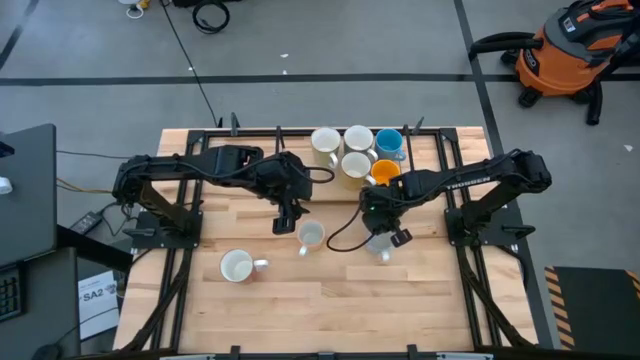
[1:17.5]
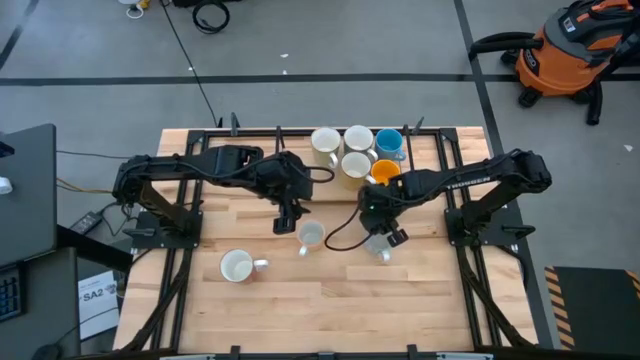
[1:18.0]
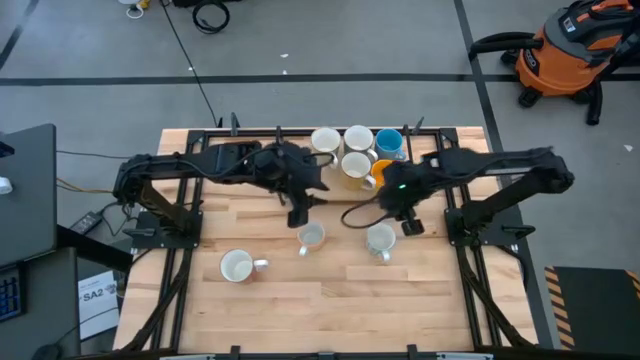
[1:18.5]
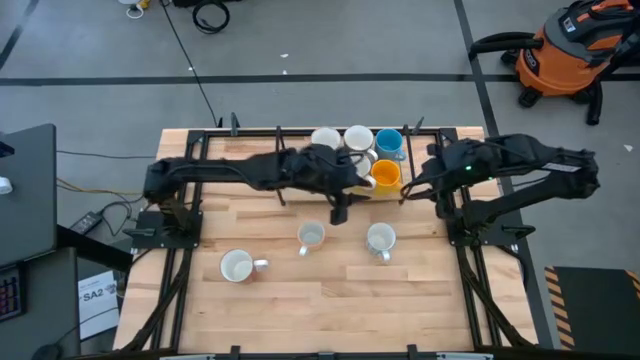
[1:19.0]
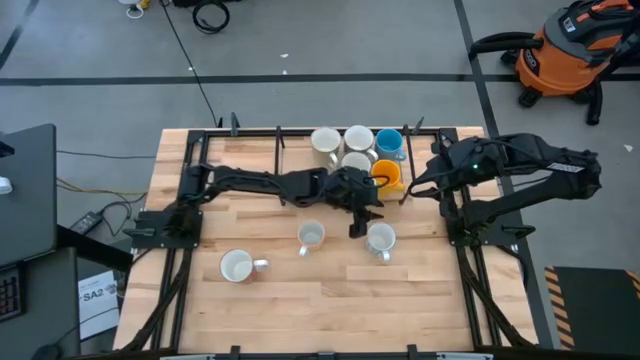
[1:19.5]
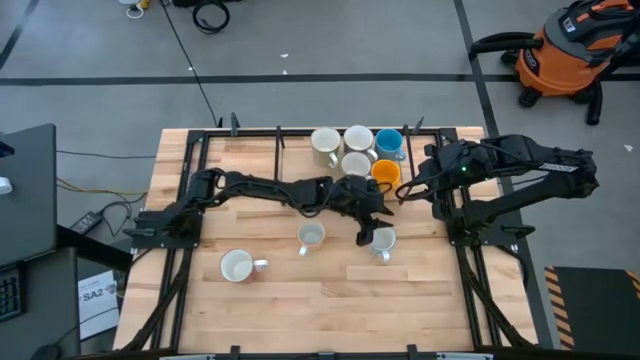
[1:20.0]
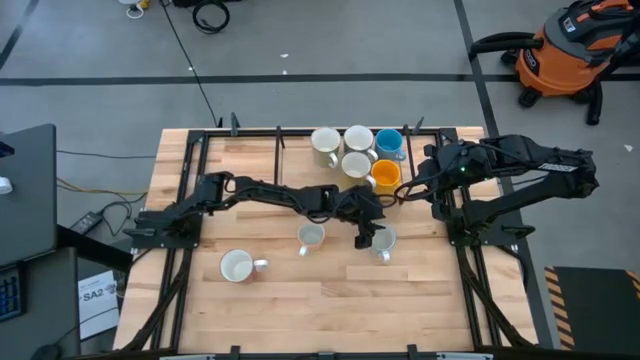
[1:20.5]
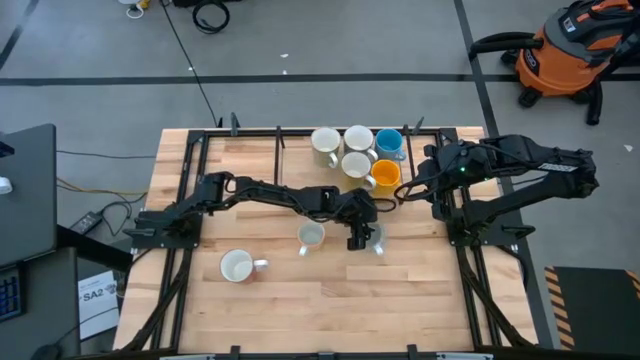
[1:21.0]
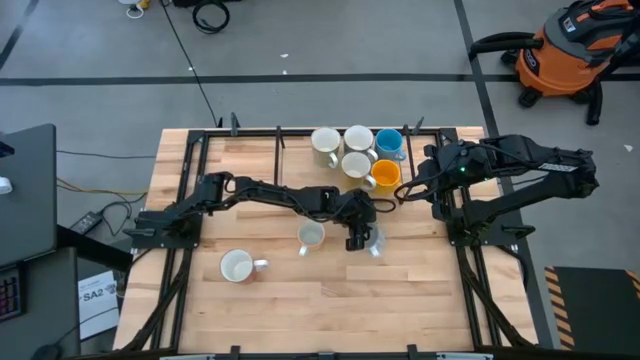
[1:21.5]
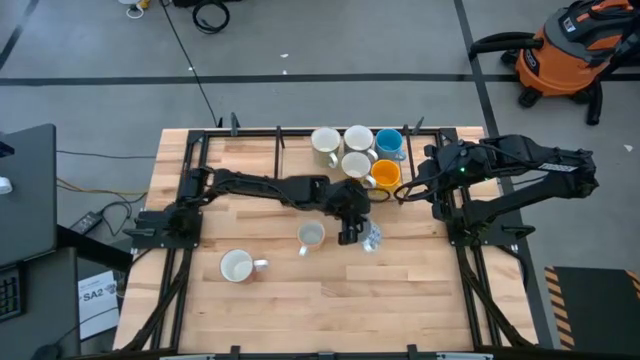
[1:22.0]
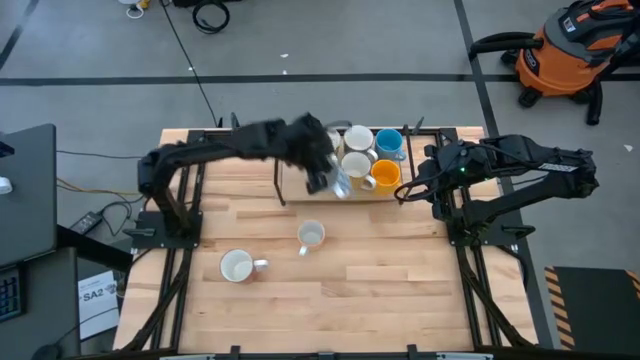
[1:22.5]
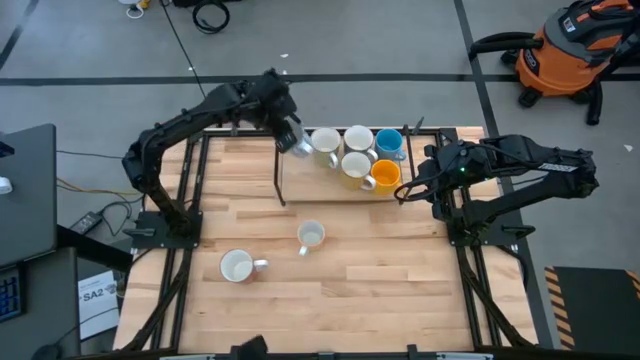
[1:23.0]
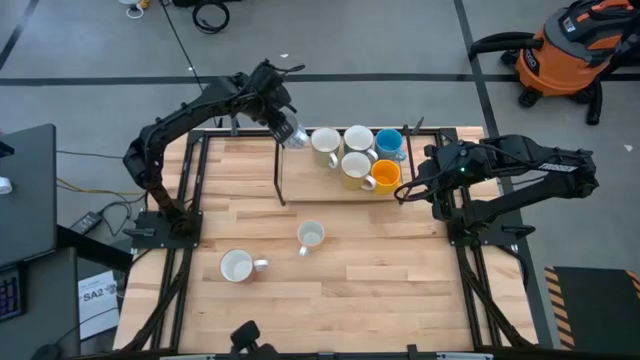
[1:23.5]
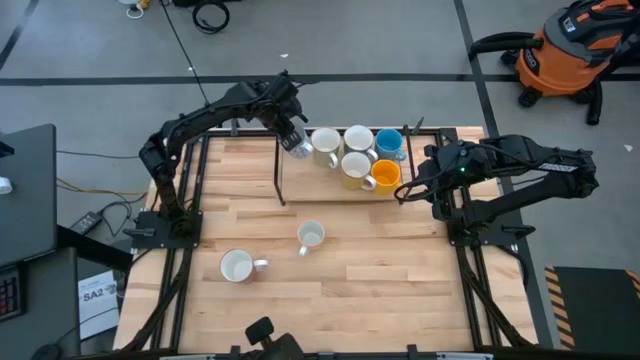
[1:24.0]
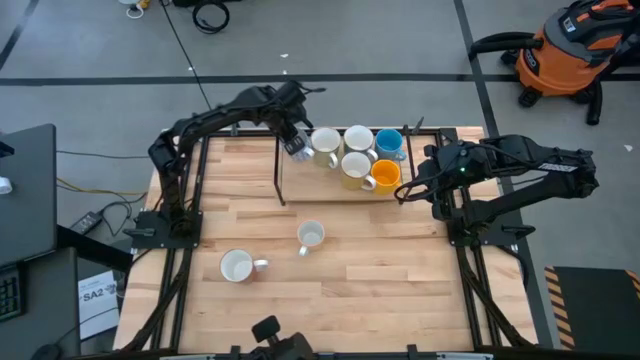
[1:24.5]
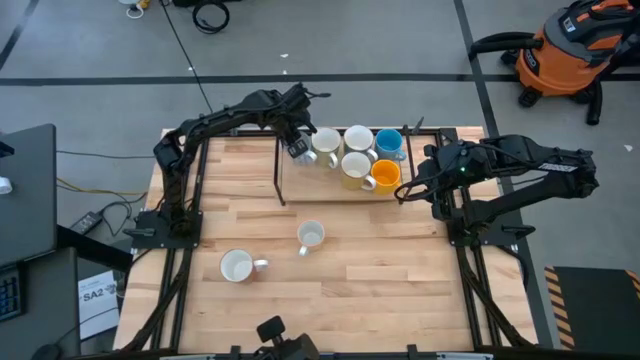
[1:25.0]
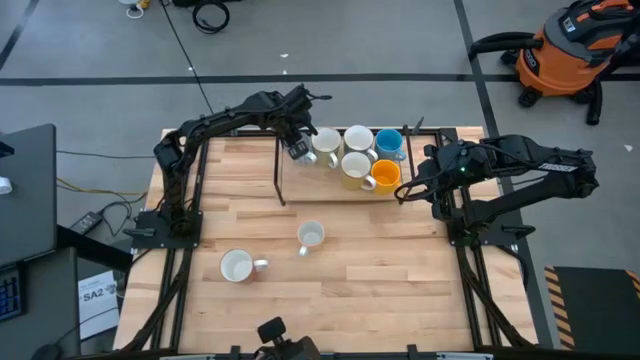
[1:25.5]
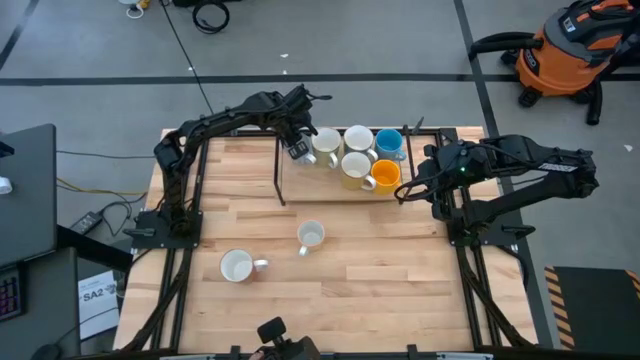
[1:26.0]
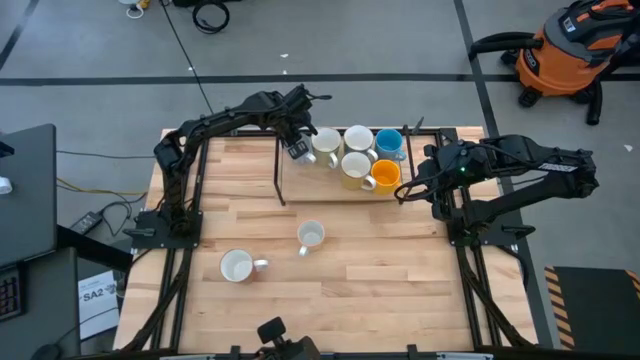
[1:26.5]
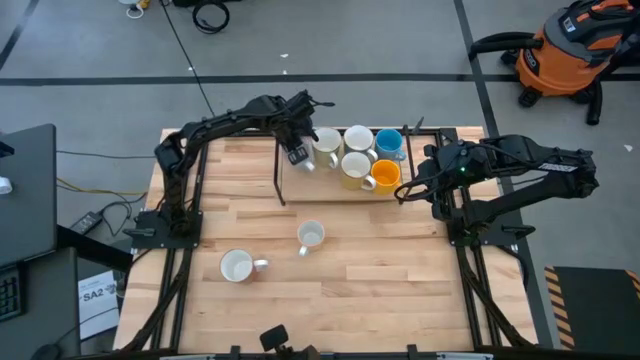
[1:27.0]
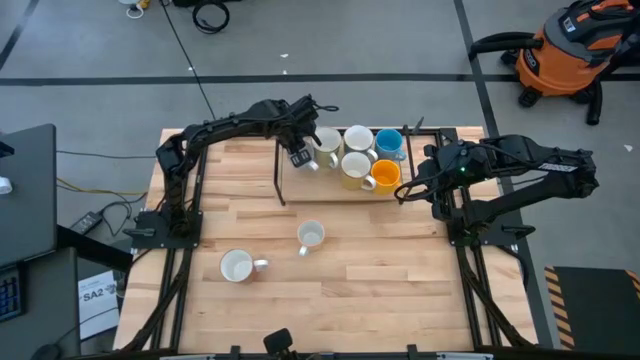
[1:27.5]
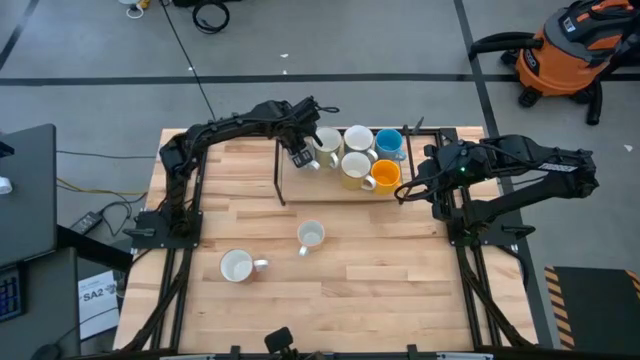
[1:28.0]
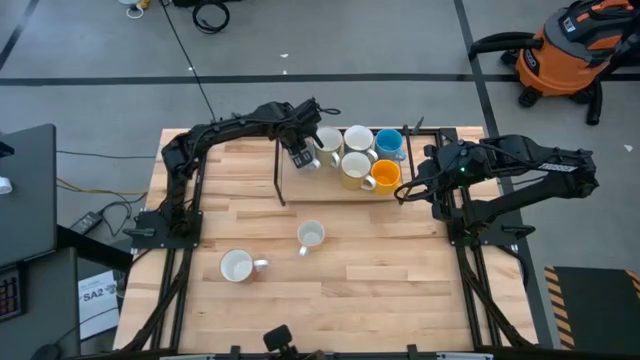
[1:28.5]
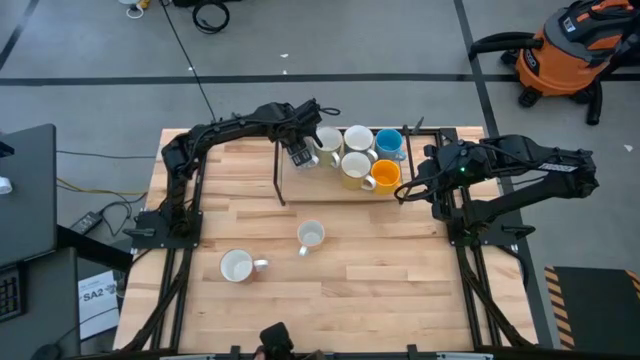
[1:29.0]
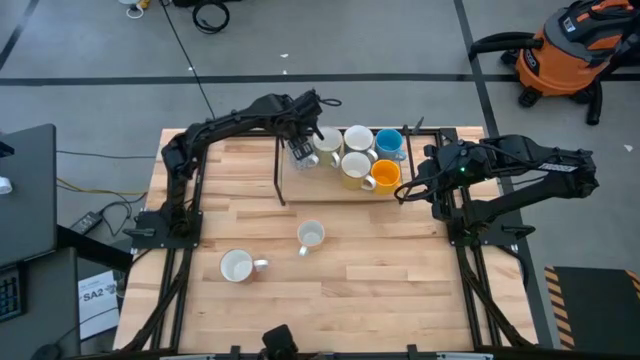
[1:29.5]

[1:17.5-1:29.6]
Task: Place coffee mugs
Put the patterned blue mug on the shelf

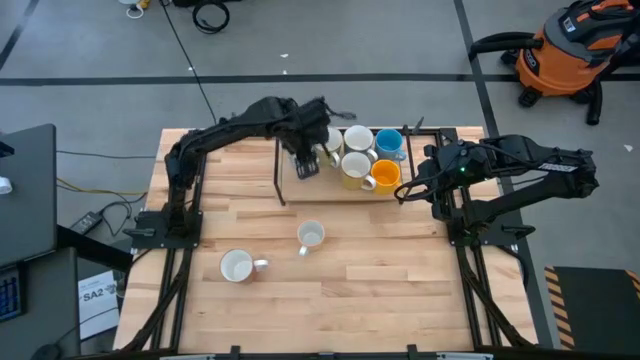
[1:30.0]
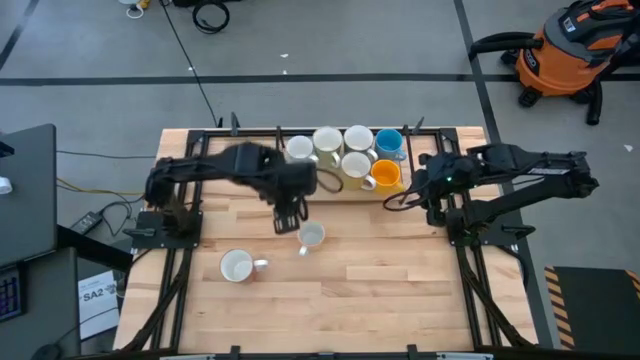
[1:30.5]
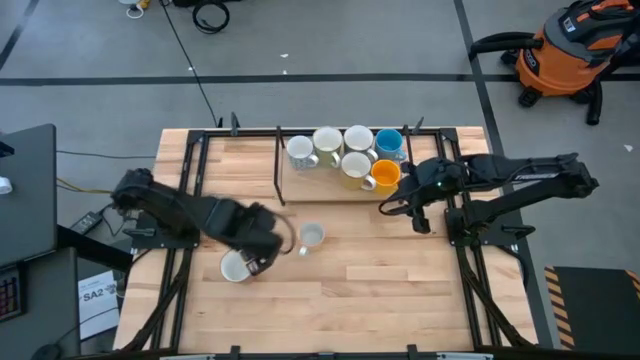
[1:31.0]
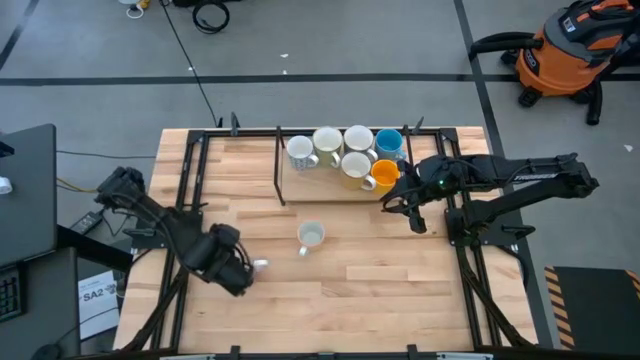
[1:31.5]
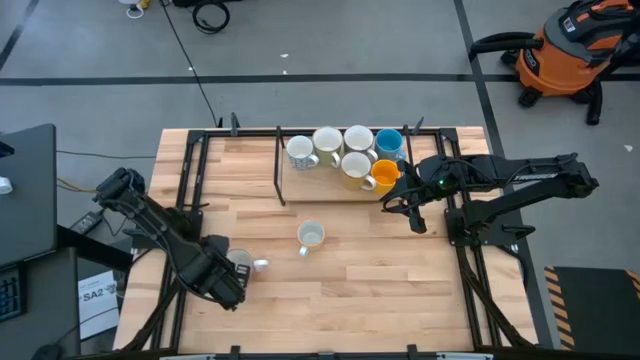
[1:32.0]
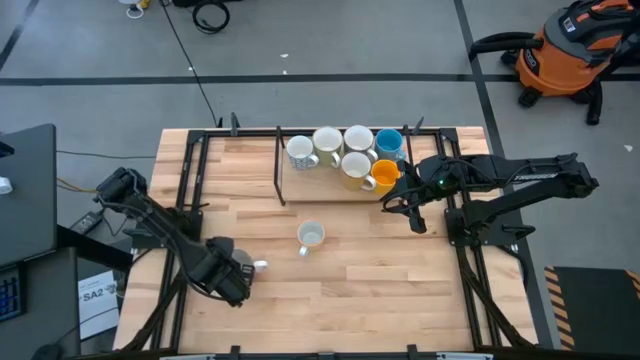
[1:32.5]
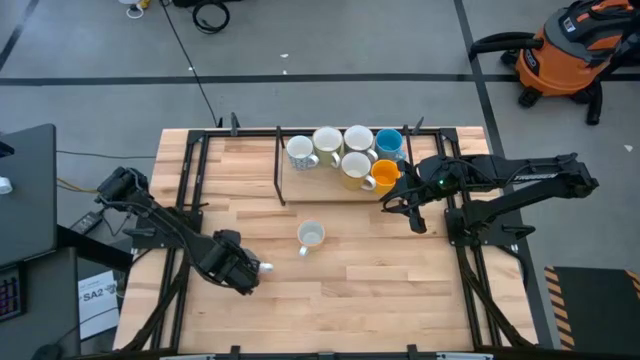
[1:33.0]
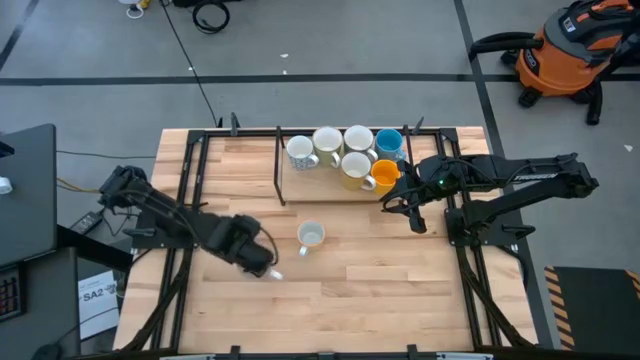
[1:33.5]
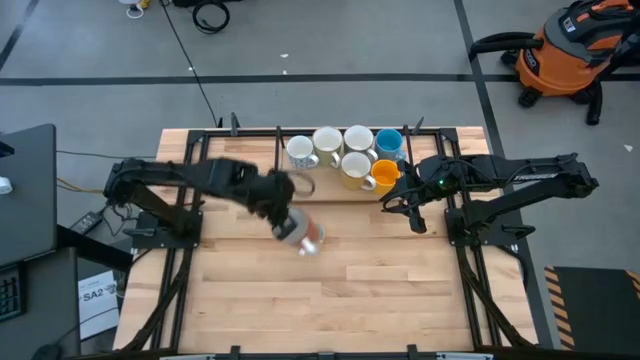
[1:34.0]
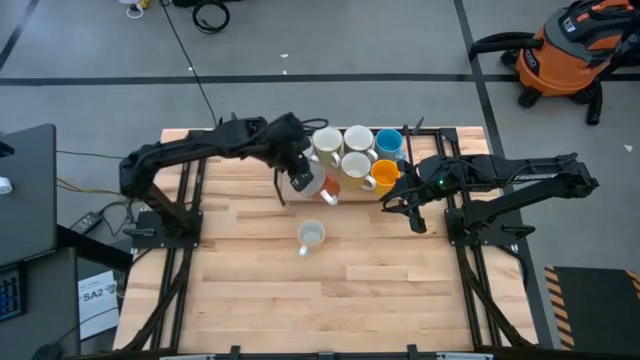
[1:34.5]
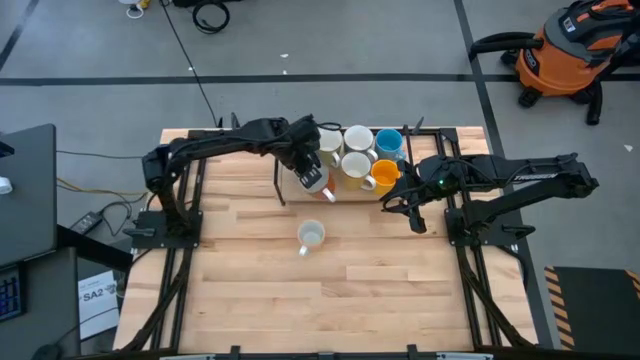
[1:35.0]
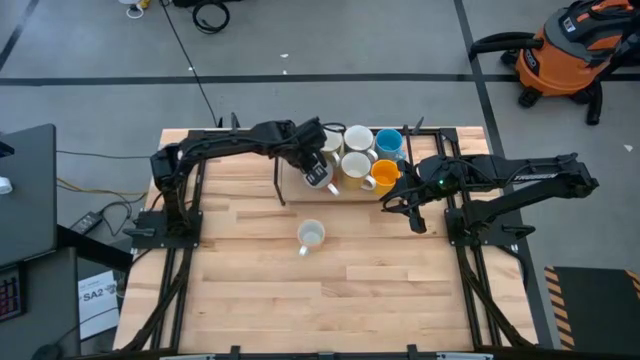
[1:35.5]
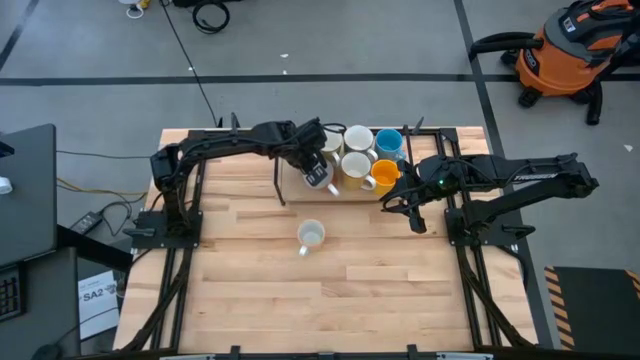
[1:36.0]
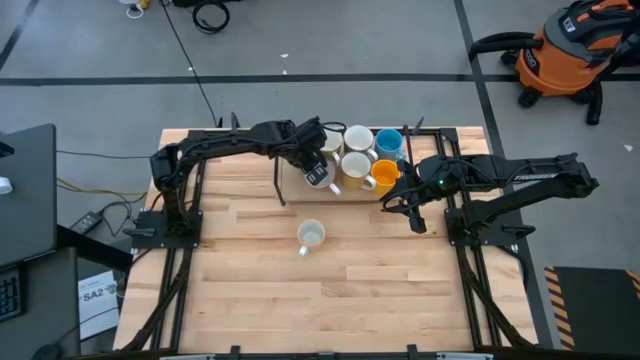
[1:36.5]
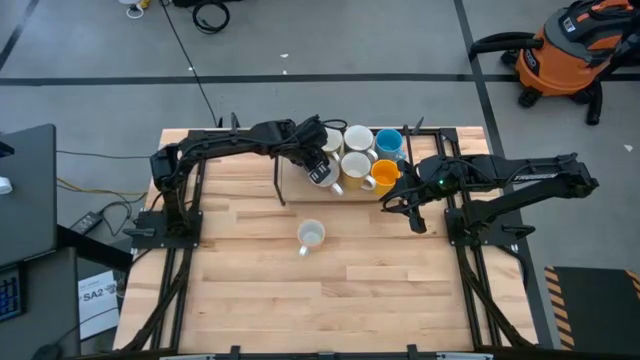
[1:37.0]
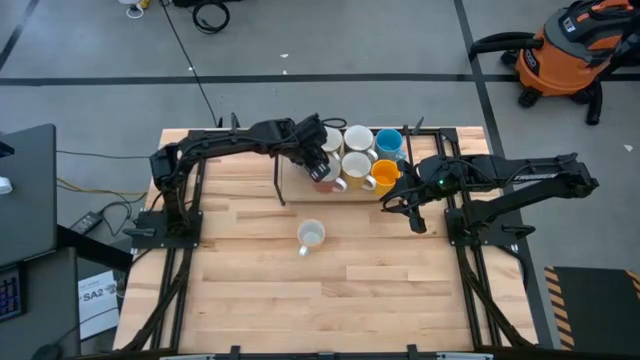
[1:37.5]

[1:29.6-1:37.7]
Put the orange mug on the shelf

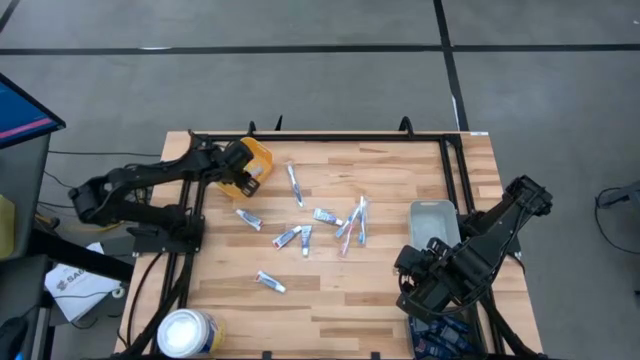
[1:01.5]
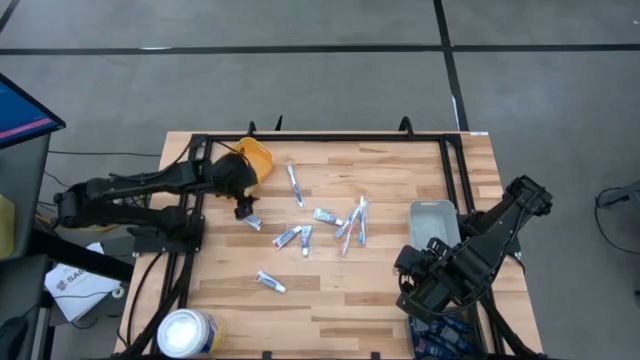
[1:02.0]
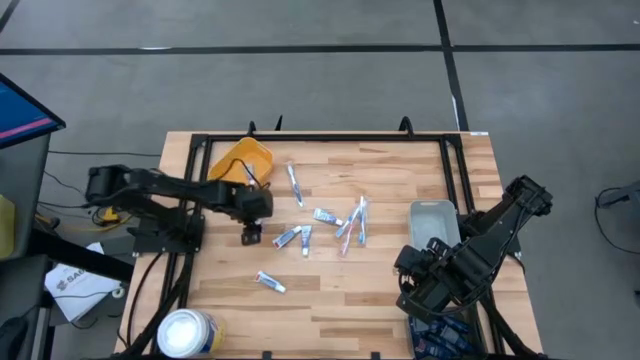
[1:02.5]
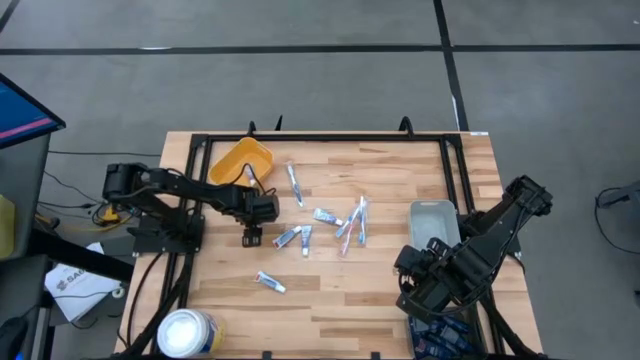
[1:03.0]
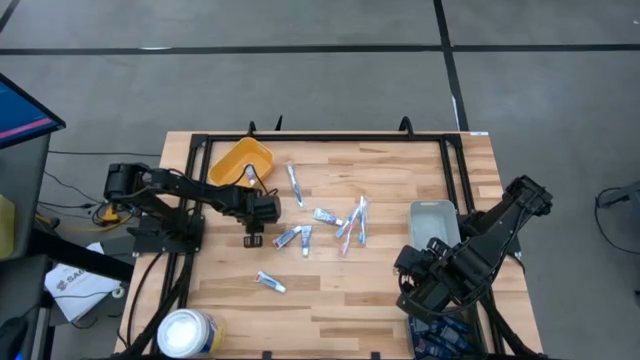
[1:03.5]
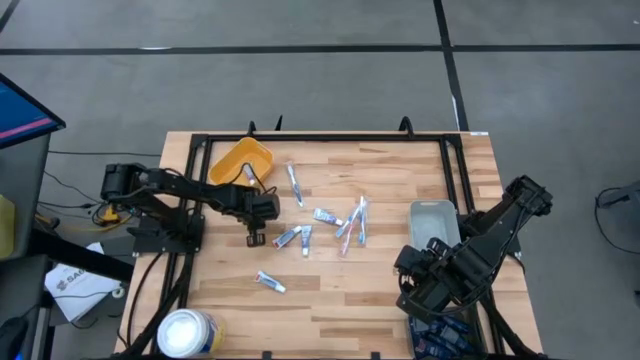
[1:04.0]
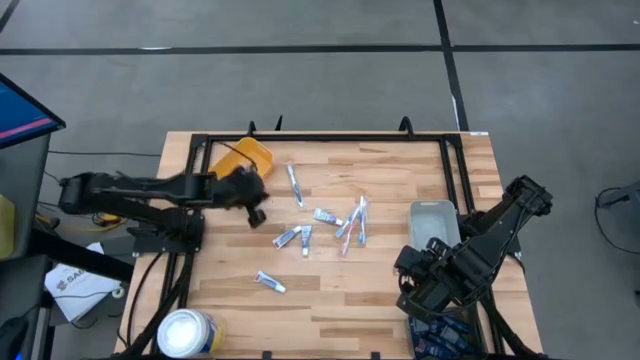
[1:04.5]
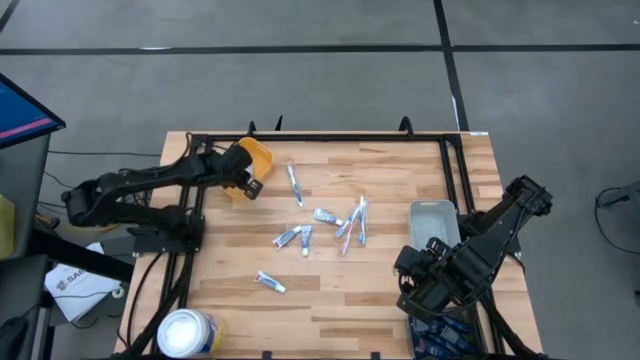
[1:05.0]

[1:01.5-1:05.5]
Task: Pick & Place Travel size toiletries
Put the white toothpaste into the yellow bin
